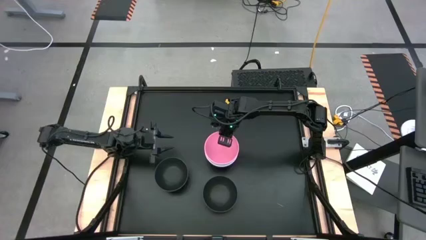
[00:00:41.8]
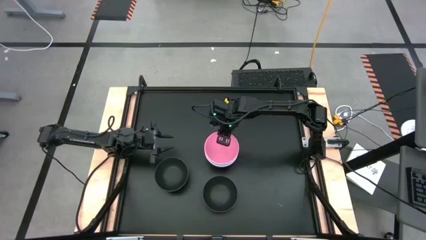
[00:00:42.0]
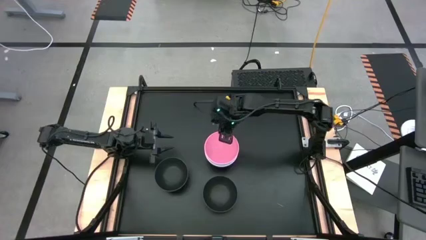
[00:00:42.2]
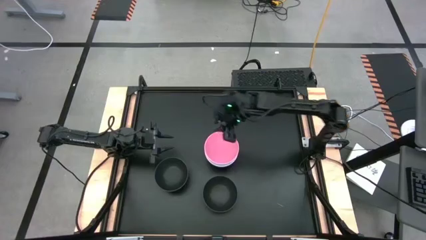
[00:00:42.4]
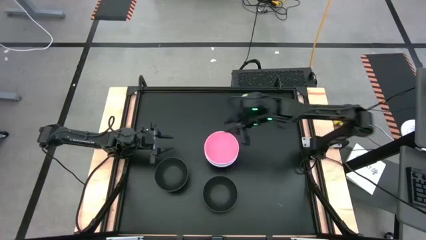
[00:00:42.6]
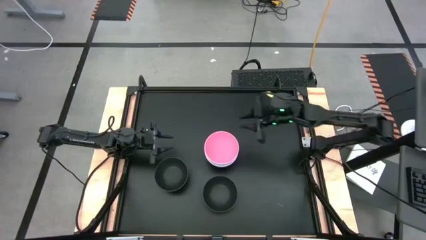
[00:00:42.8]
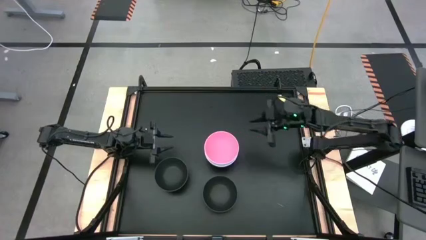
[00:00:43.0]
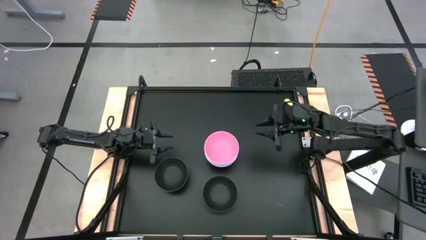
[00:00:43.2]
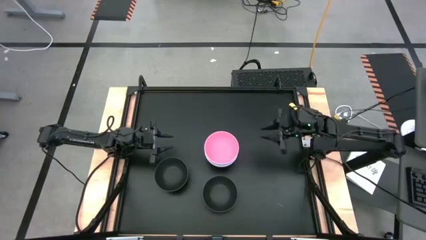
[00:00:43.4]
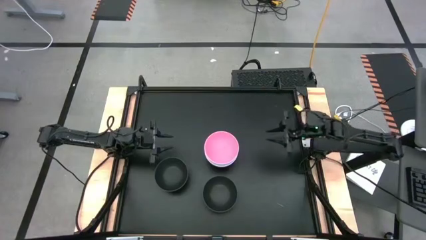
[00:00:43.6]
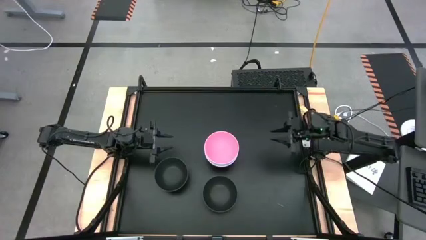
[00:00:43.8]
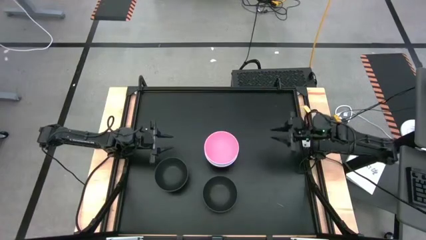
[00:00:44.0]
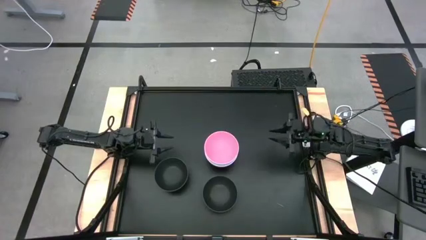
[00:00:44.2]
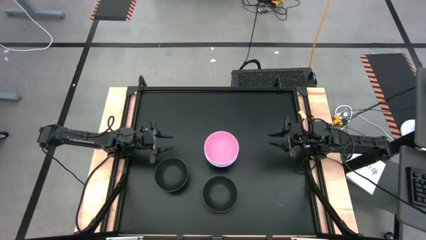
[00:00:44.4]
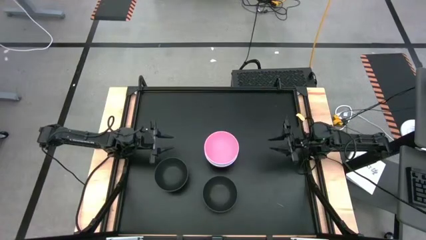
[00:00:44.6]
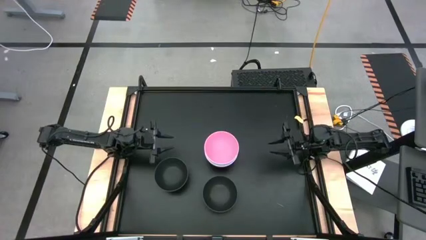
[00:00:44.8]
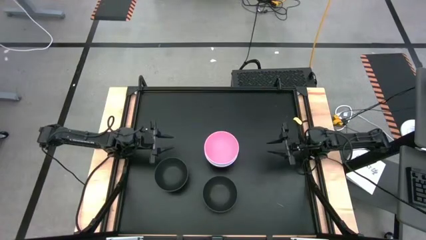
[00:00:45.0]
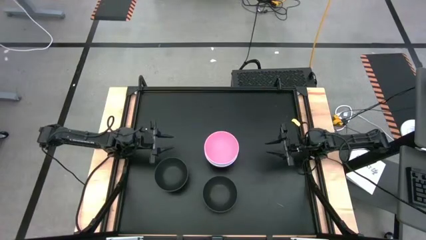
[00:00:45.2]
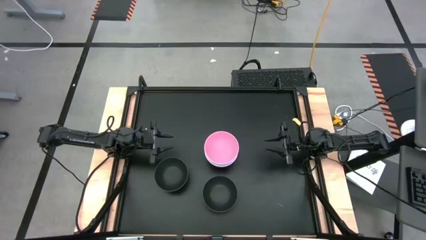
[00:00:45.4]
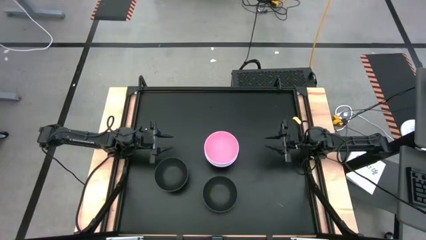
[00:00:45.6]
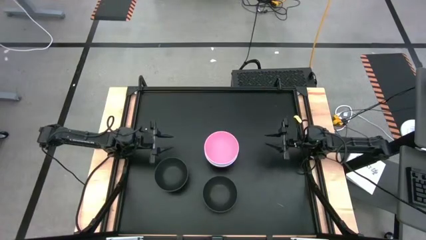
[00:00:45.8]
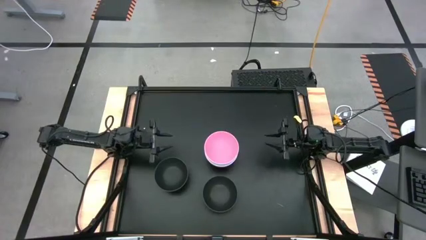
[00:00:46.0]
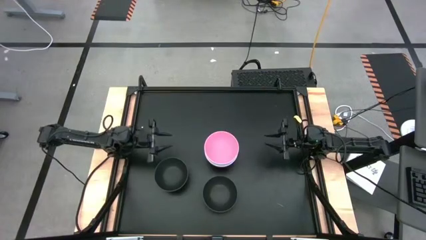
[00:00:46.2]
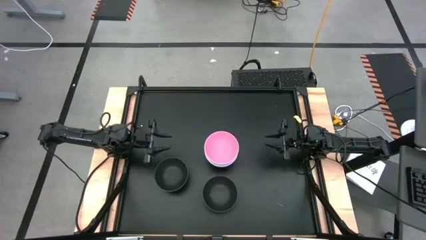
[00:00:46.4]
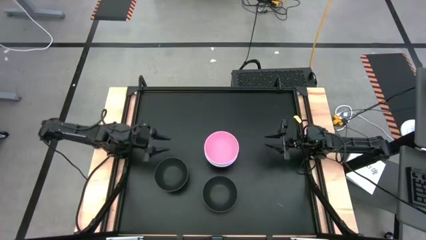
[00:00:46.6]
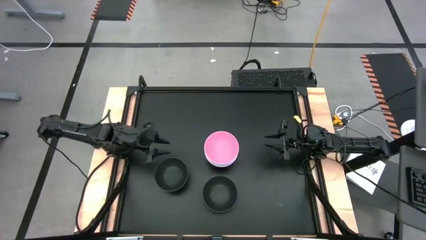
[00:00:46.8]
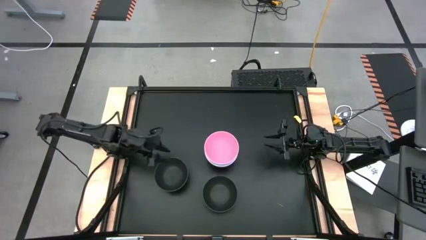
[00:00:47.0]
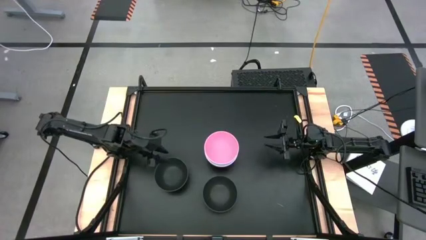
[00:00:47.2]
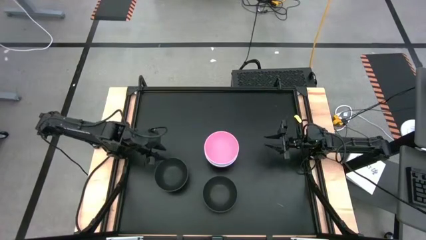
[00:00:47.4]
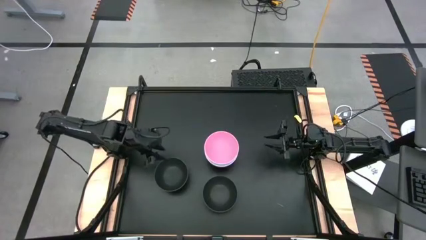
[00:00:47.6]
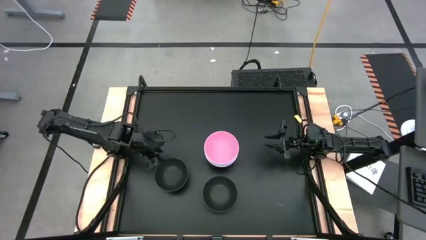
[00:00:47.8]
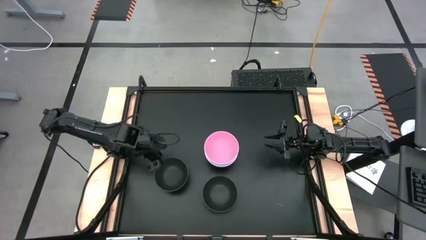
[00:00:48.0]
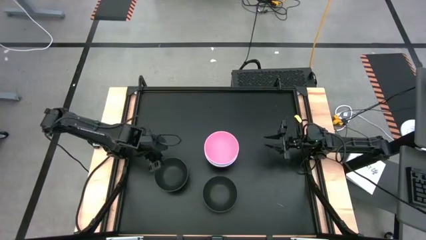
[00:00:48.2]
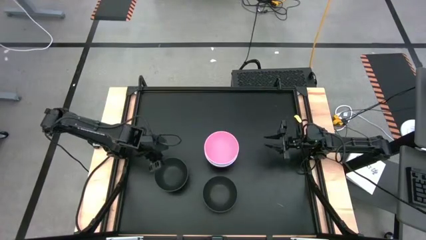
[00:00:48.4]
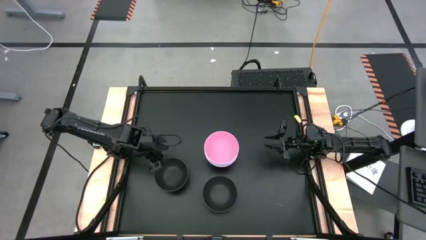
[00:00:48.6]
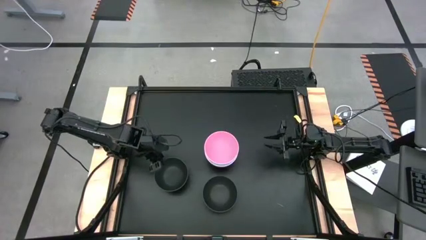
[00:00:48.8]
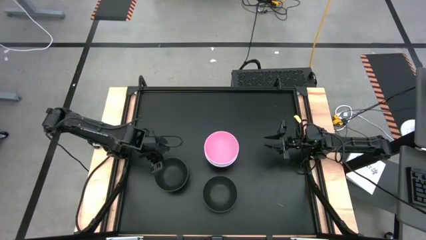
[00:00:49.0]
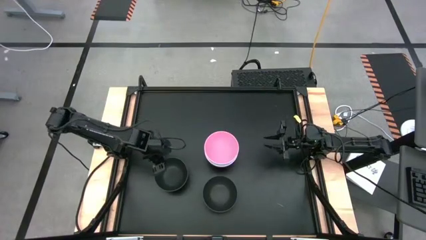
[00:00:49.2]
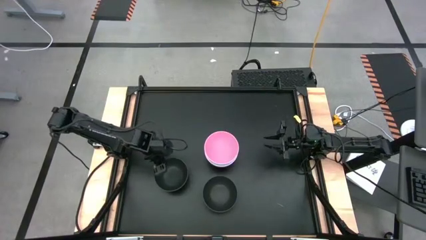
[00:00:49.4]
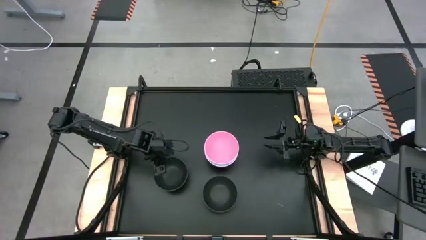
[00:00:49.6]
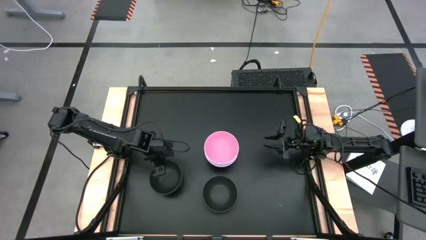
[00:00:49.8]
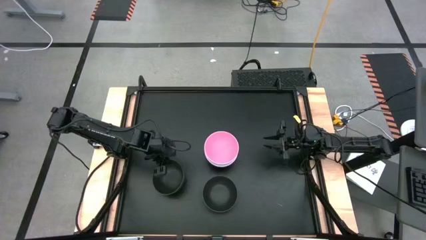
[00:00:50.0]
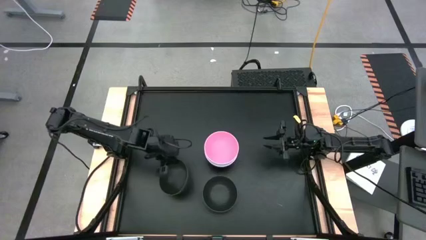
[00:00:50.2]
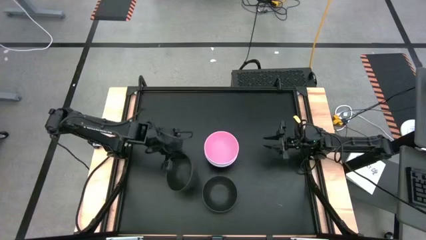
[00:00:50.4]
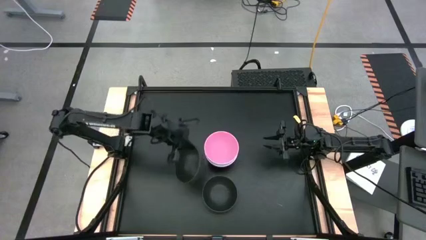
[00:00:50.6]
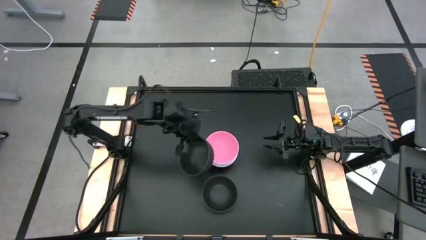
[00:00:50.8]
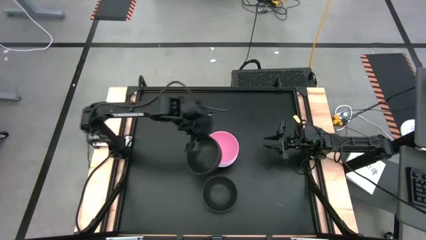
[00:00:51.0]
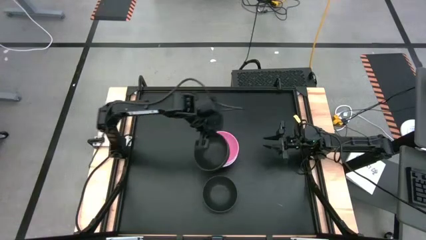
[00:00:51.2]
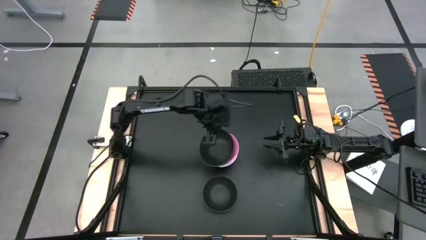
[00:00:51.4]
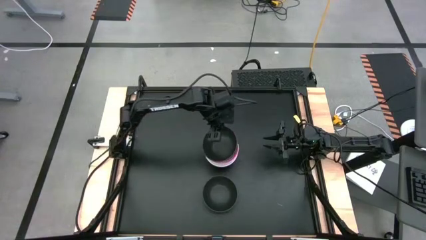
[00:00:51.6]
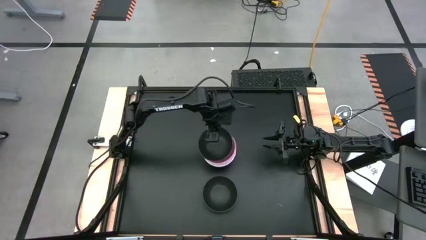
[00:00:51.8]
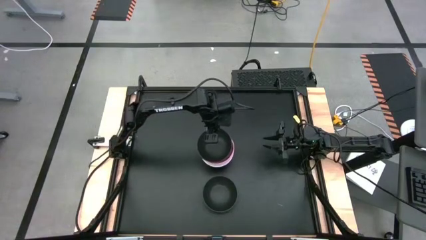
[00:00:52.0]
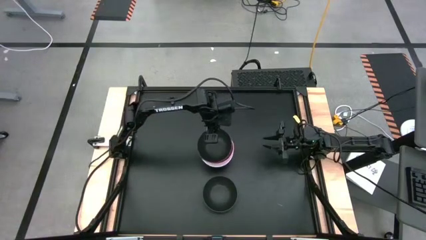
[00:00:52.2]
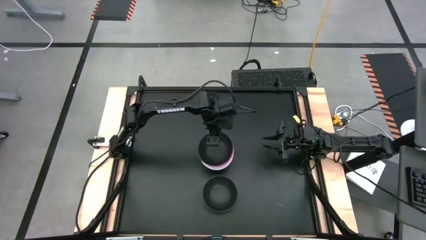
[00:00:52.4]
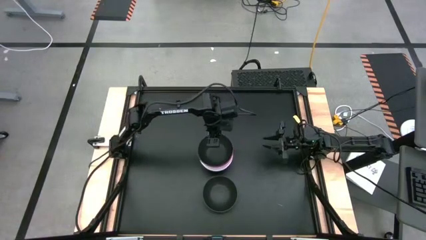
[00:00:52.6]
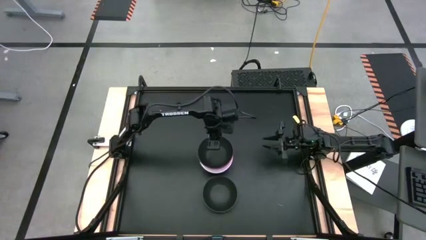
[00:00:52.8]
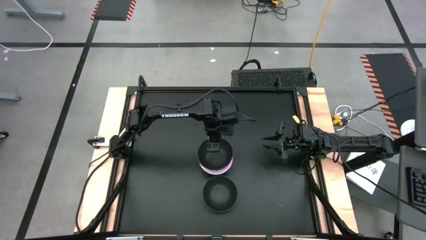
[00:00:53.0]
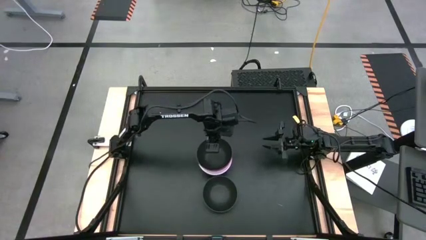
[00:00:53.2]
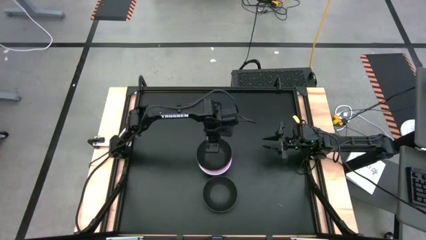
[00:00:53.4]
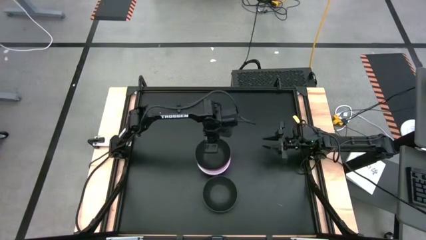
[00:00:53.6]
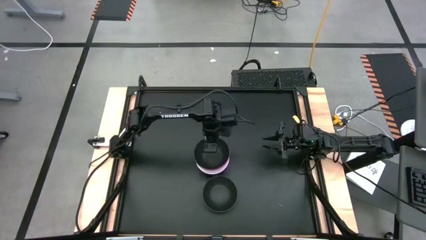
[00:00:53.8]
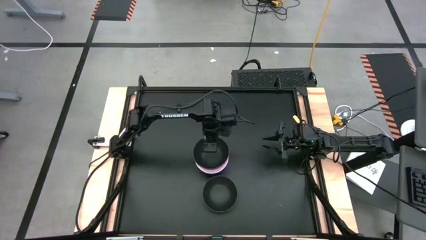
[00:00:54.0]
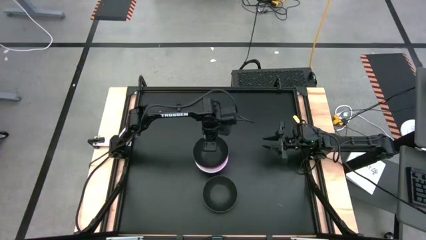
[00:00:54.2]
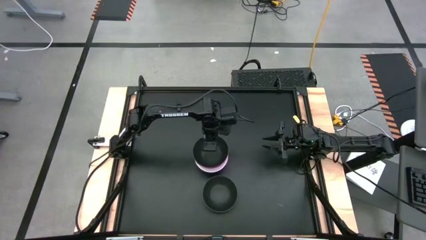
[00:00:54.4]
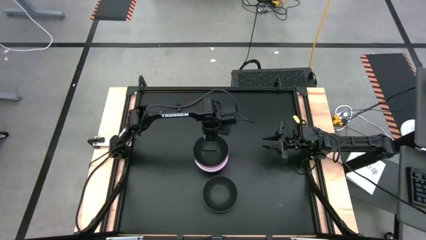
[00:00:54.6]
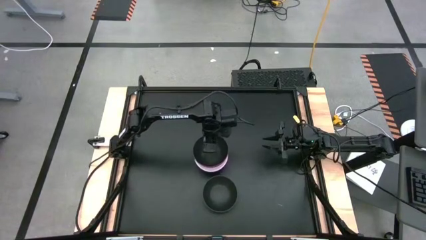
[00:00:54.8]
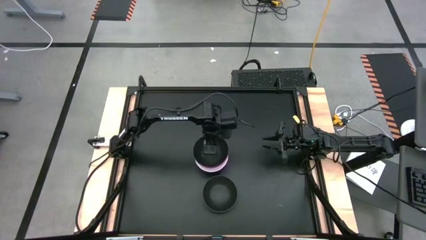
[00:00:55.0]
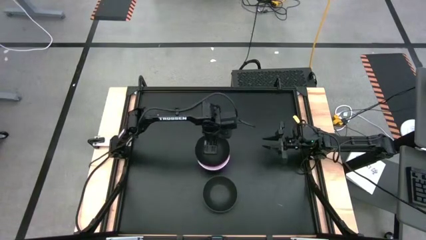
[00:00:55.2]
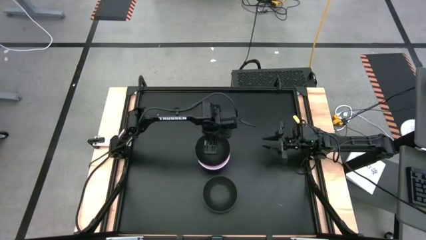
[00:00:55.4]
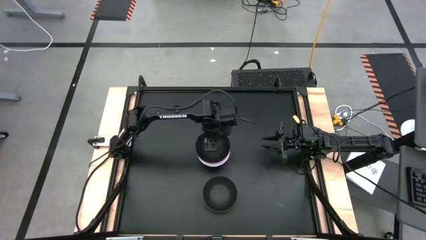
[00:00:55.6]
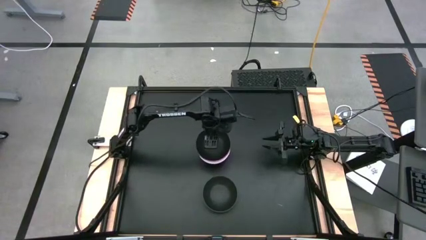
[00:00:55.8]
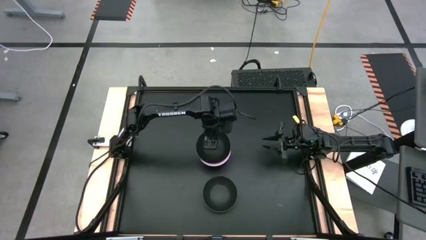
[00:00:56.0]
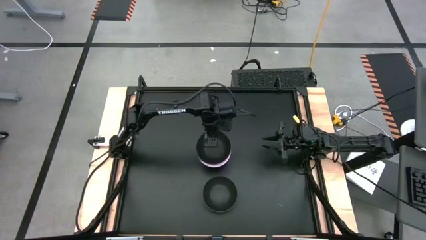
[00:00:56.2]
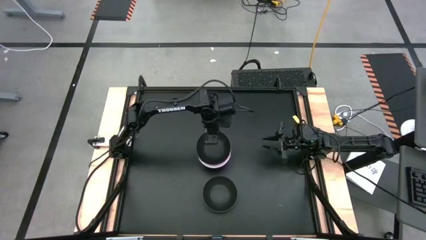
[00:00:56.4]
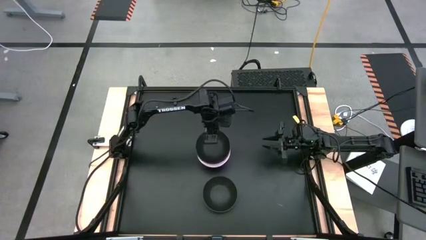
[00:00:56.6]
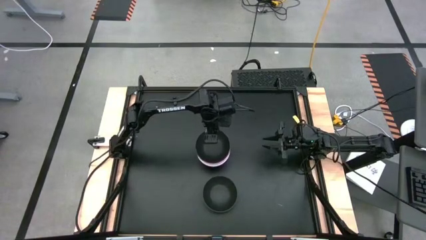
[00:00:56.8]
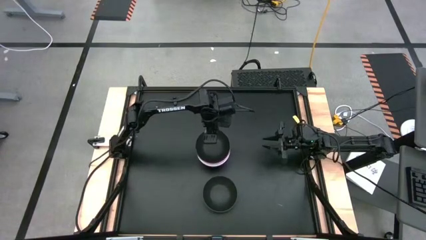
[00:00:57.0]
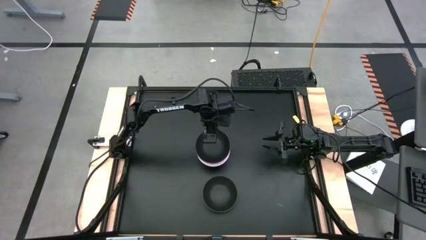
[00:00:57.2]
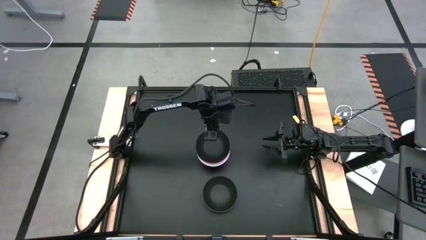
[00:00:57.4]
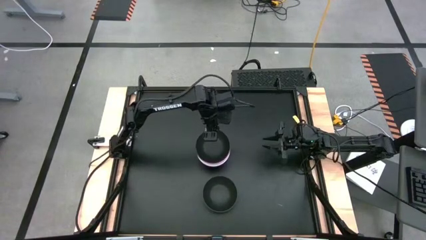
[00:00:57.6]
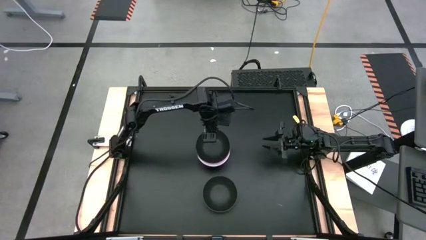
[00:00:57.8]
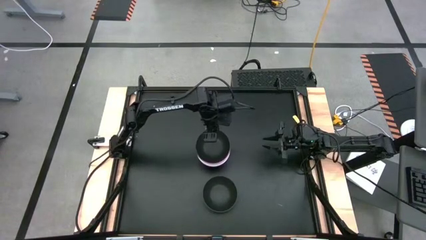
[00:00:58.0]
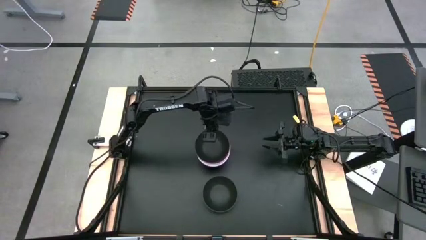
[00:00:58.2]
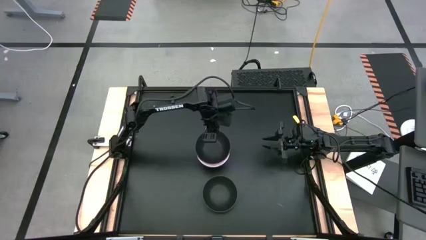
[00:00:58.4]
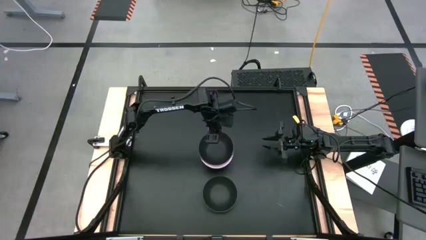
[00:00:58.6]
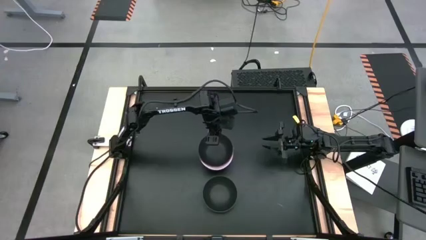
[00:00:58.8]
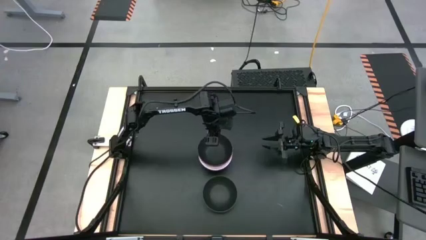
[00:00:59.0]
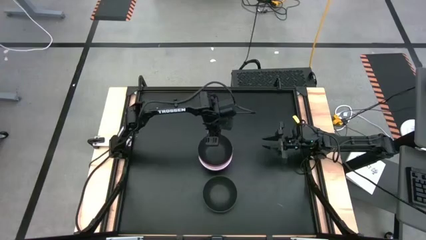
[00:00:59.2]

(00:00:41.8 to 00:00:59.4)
Task: Nest bowls inside each other
Stack the left black bowl on top of the pink bowl
